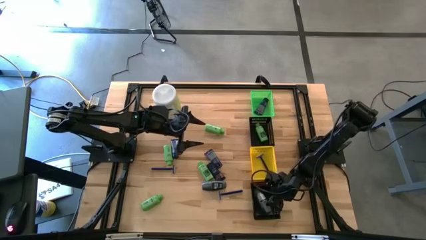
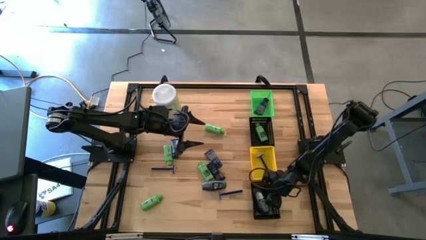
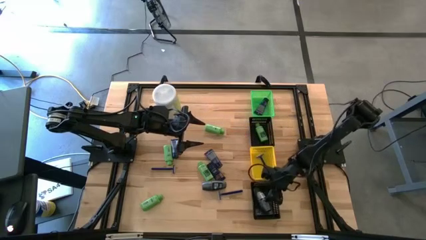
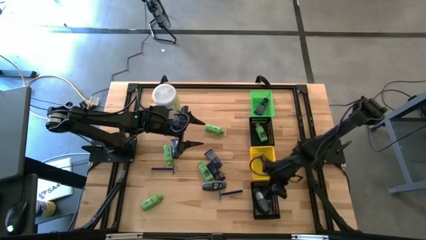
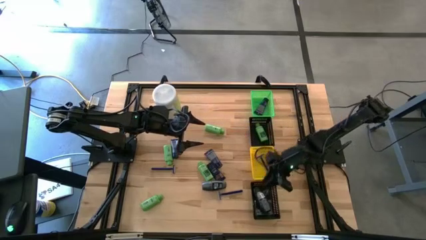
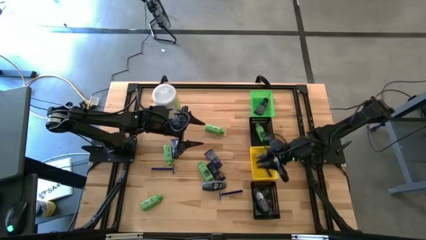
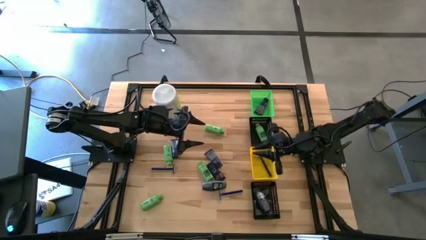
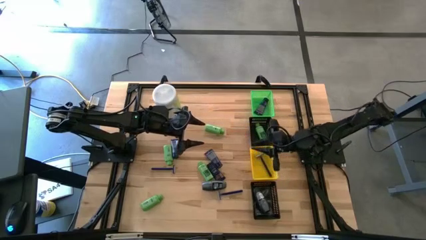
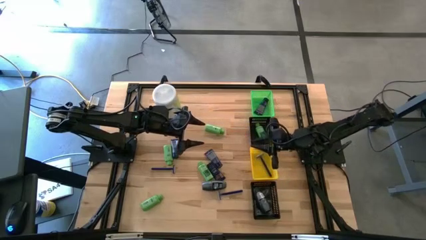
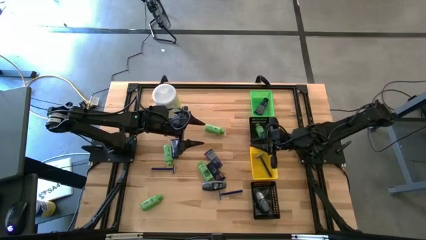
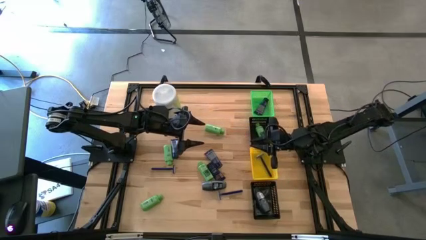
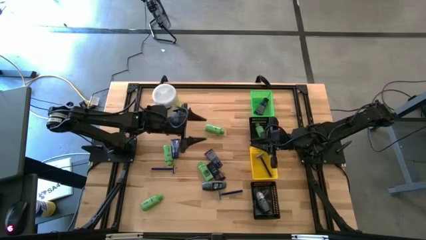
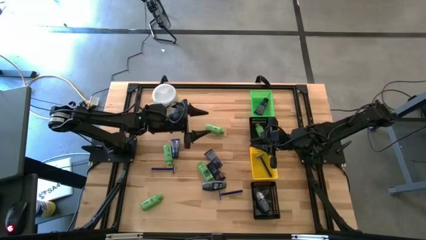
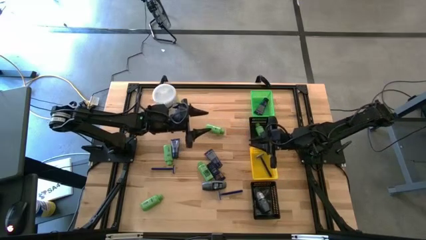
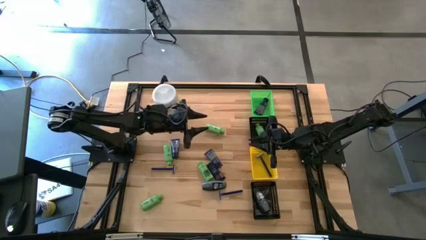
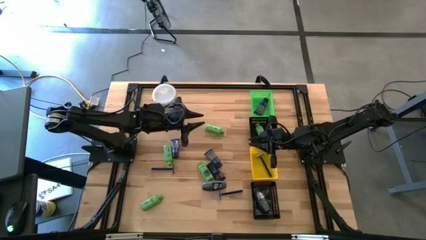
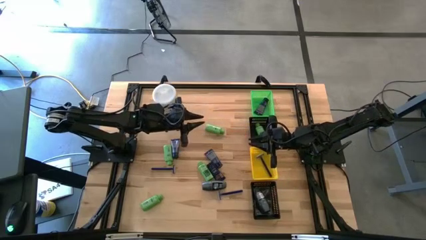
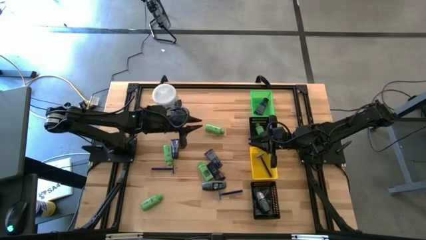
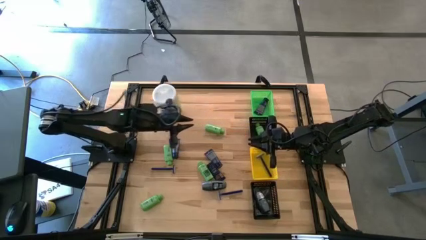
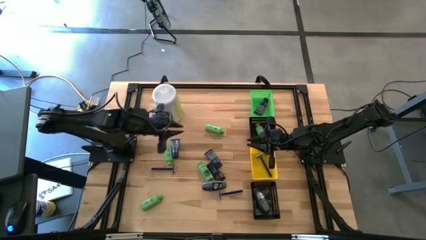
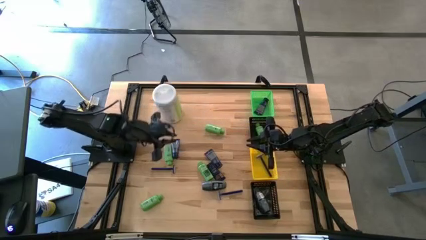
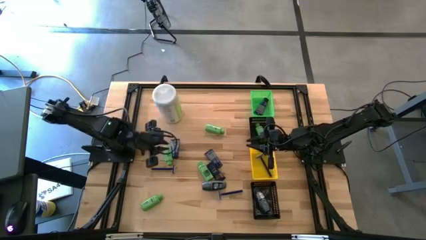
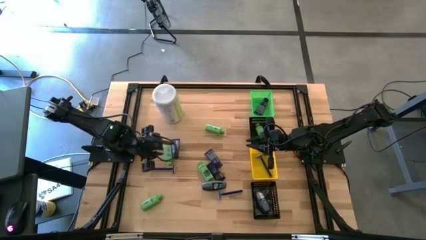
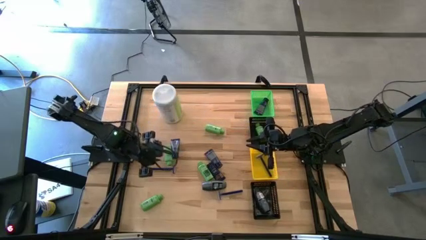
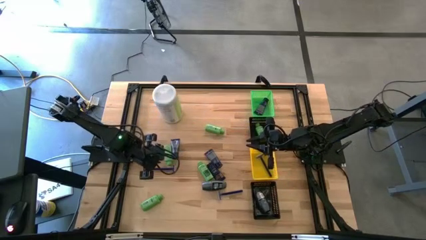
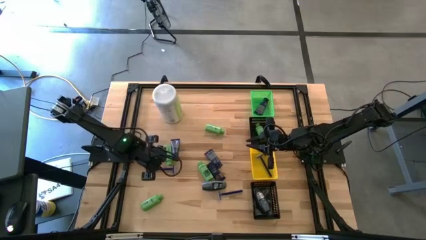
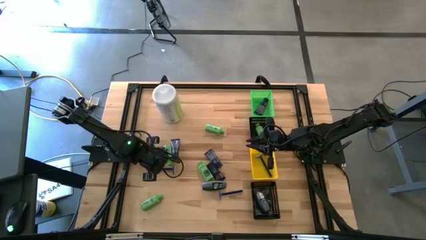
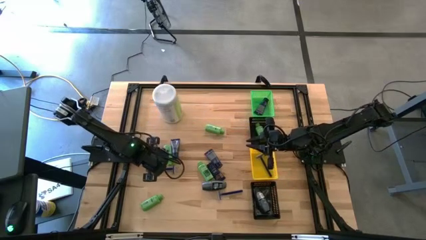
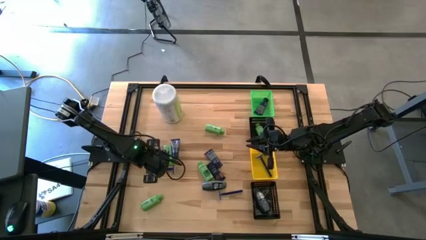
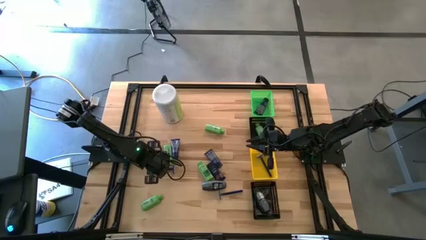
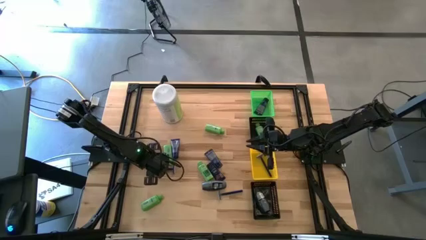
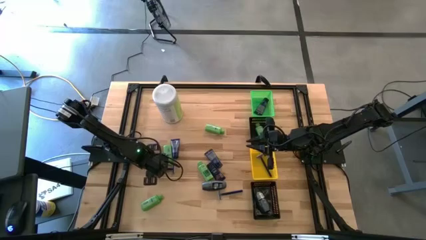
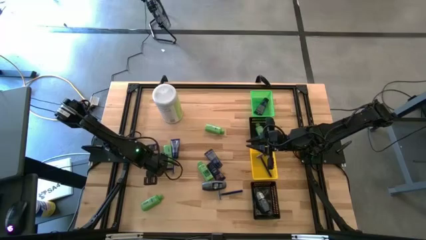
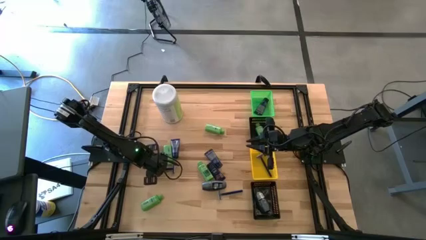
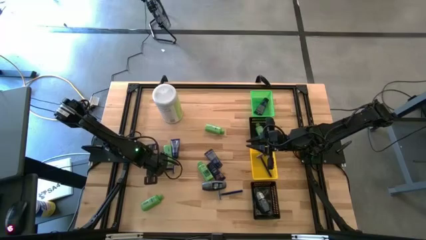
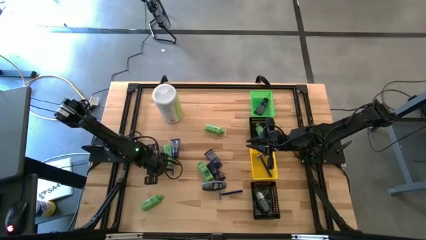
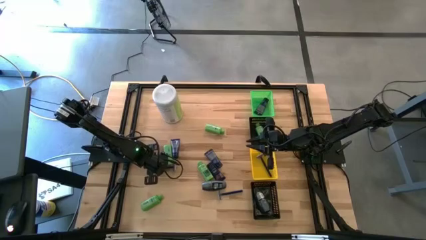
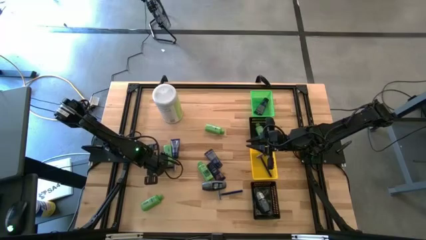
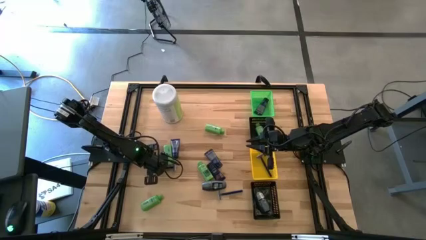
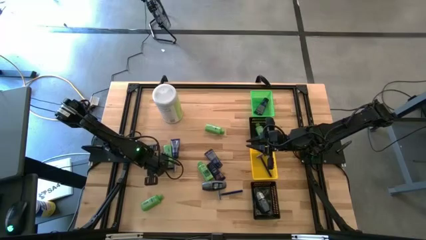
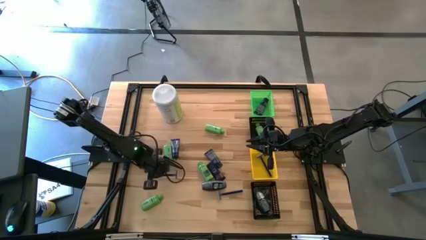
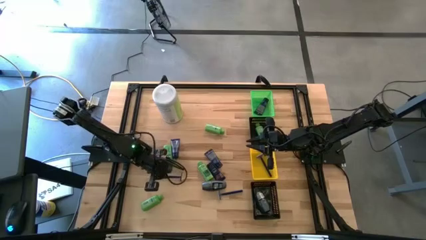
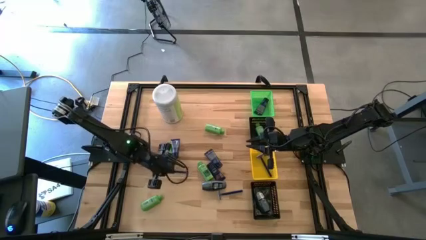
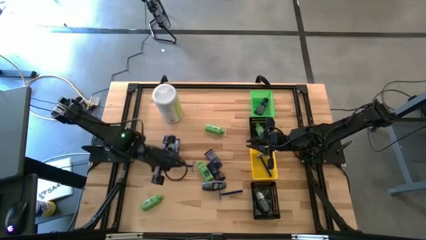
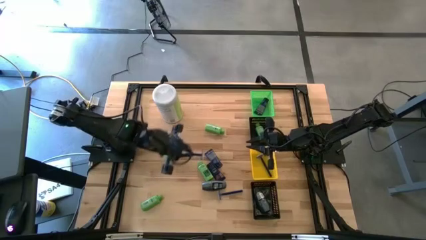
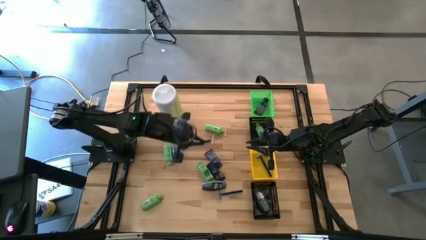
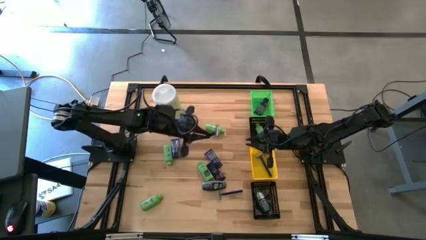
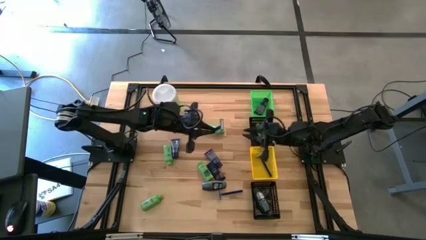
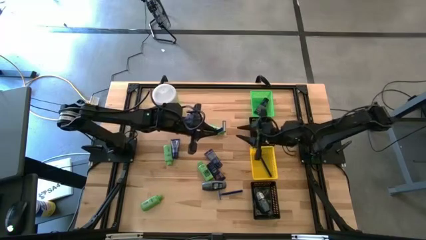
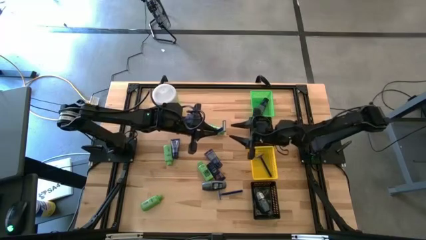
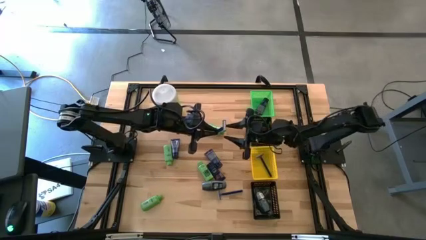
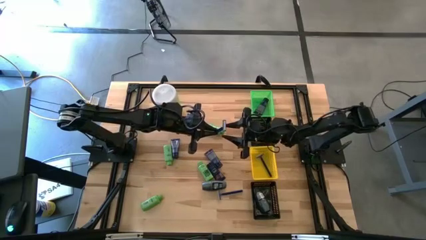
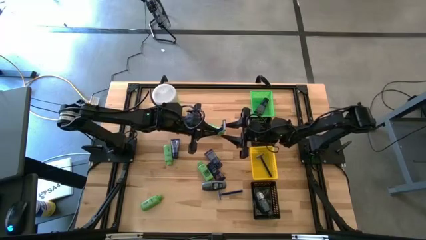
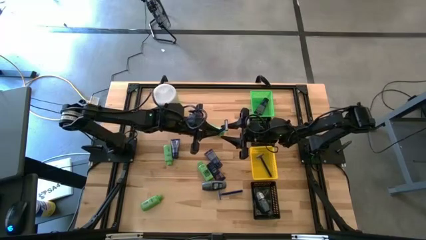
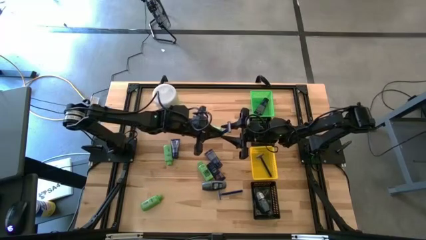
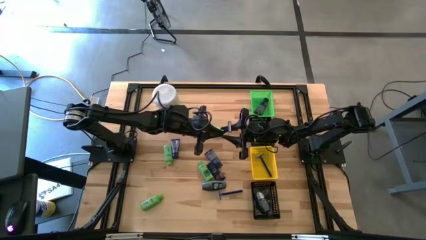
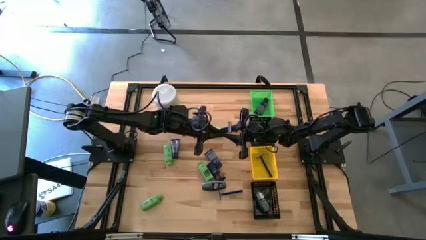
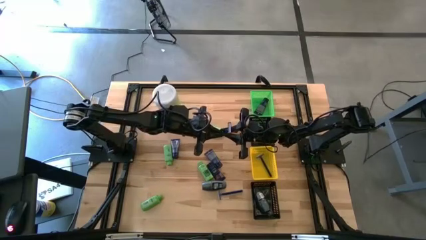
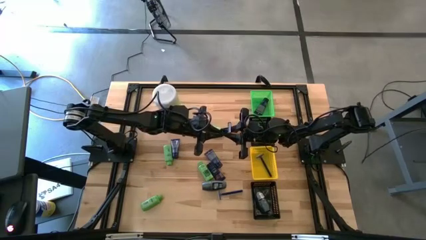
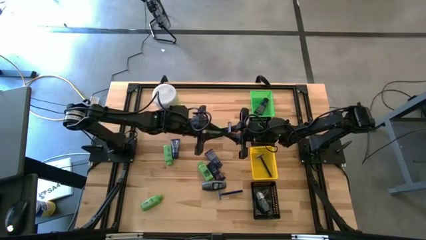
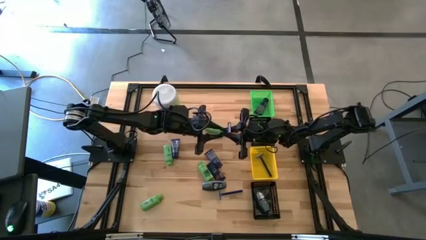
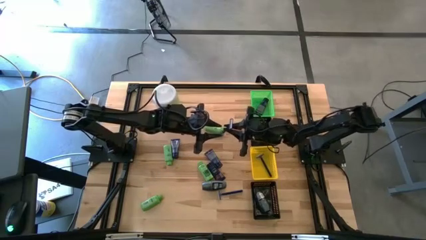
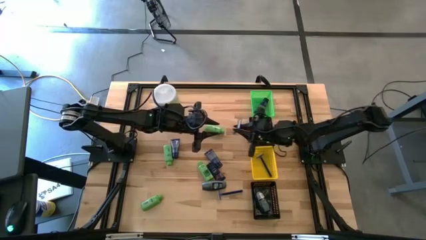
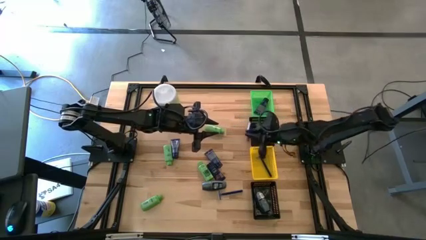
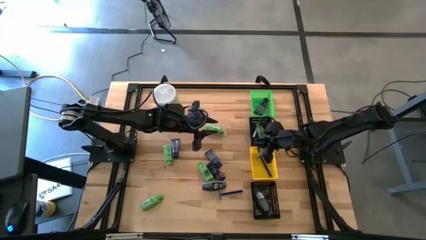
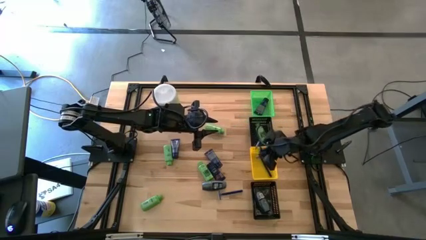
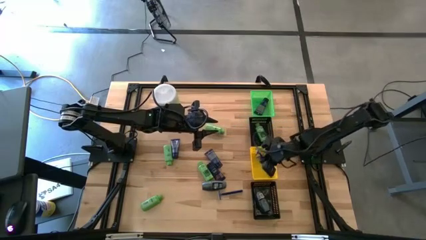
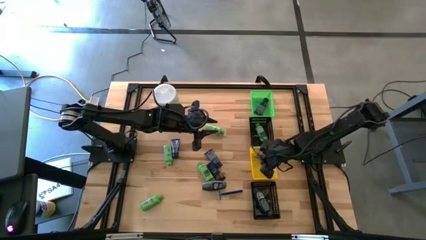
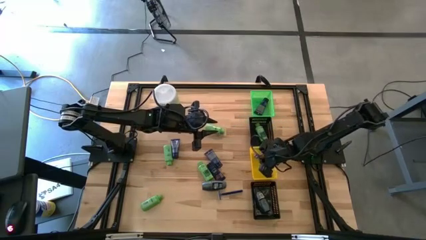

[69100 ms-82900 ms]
Task: Pick & Place Travel size toiletries
Put the blue razor into the yellow basket

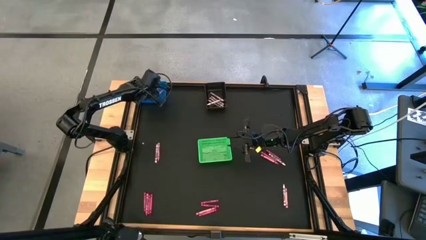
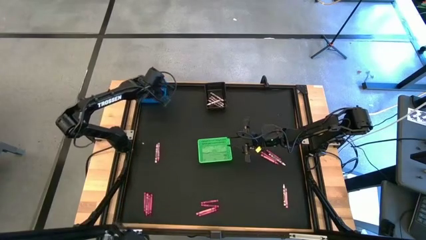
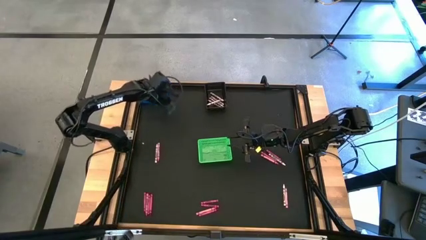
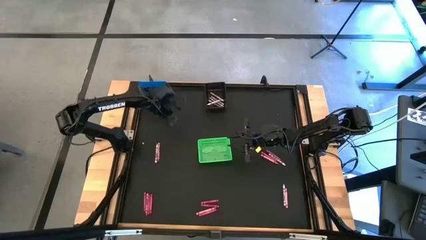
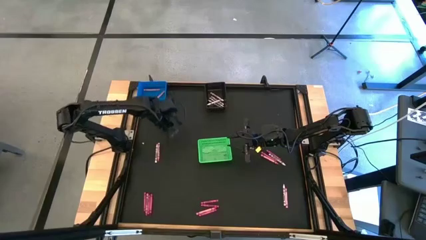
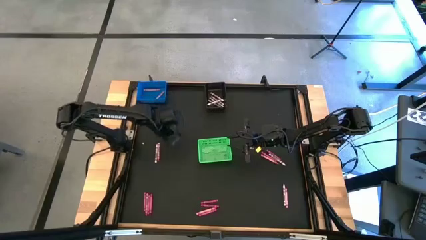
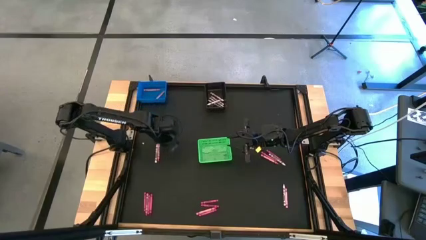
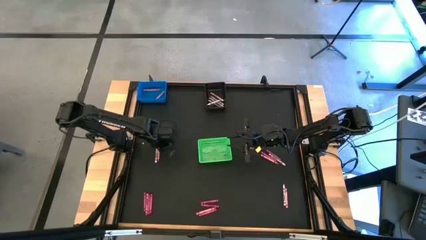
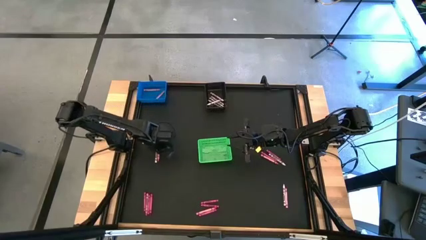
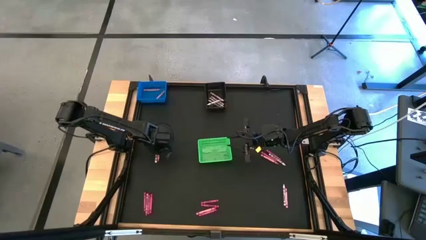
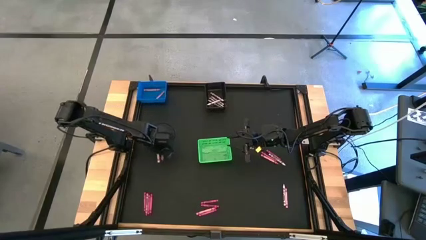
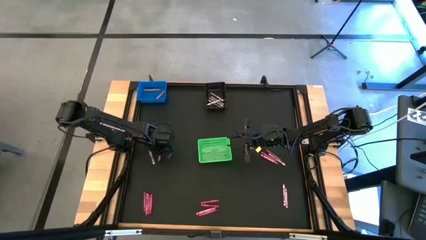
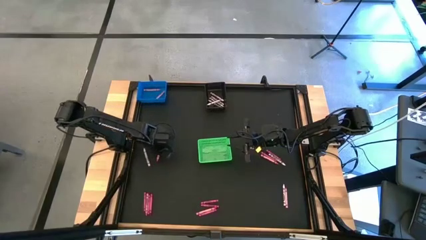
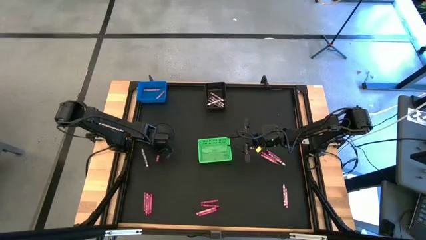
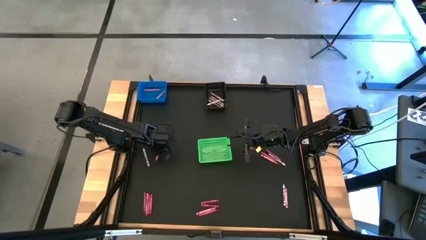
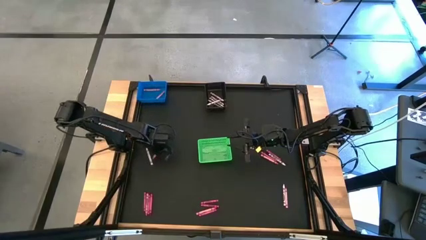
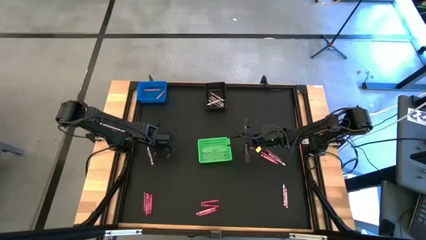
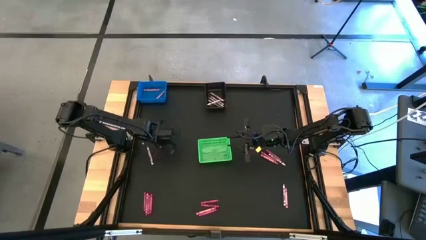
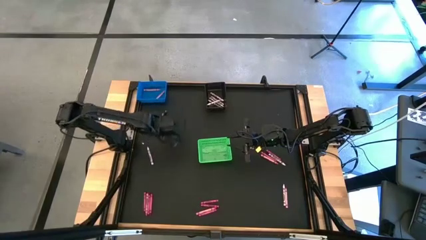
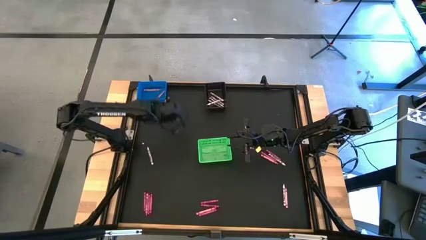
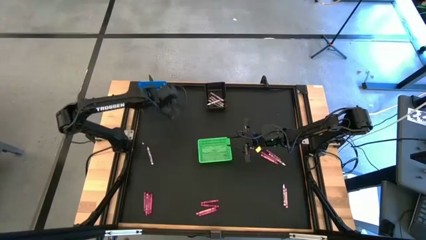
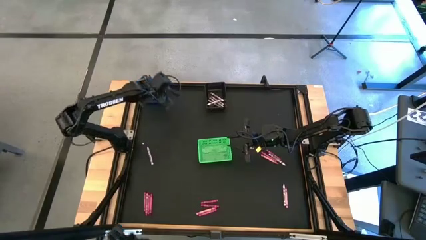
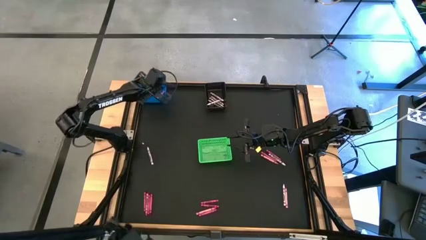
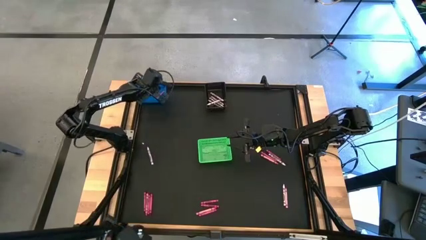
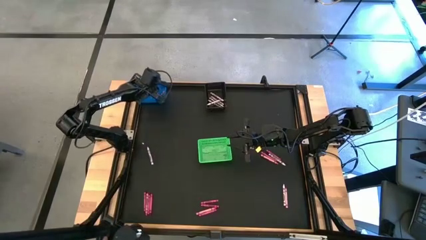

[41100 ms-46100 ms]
Task: Sort crayons
Put the pink crayon into the blue bin
